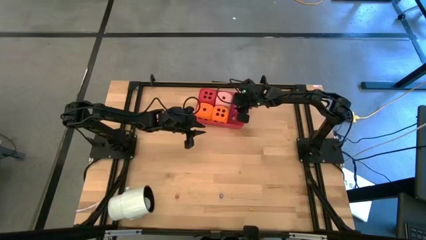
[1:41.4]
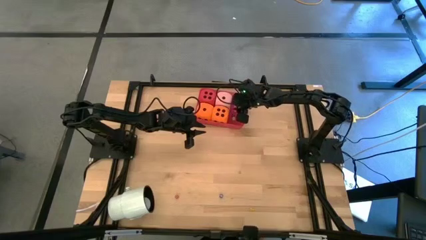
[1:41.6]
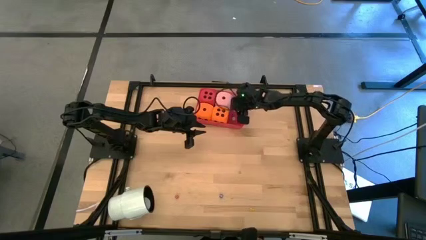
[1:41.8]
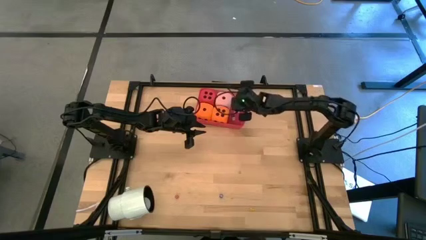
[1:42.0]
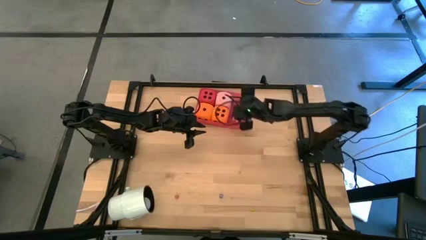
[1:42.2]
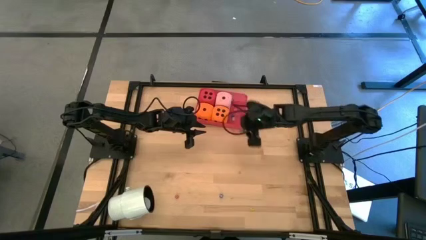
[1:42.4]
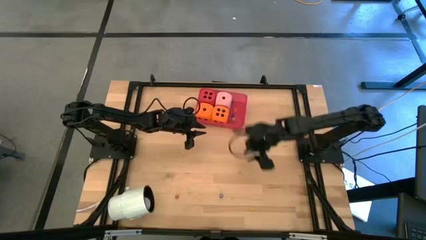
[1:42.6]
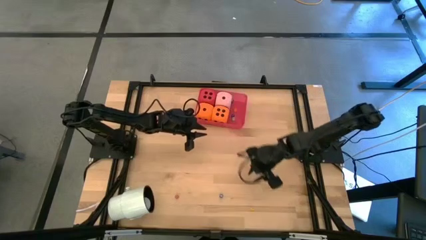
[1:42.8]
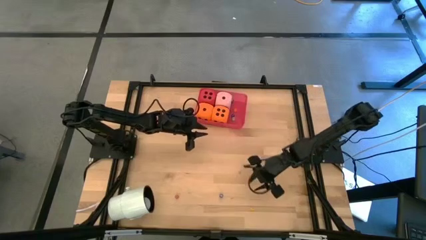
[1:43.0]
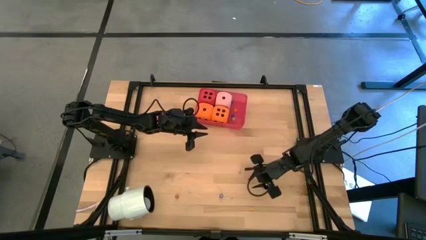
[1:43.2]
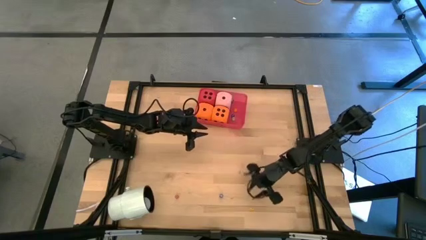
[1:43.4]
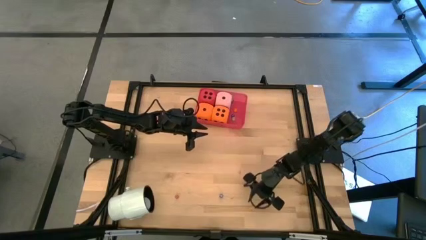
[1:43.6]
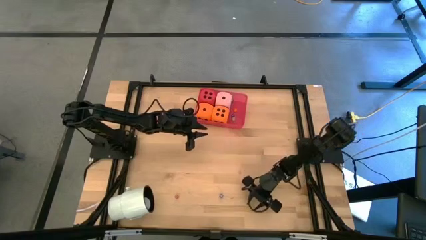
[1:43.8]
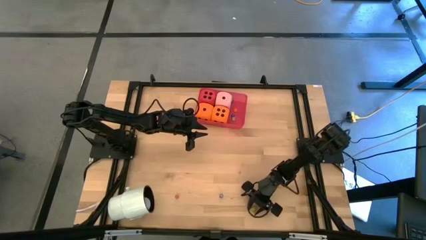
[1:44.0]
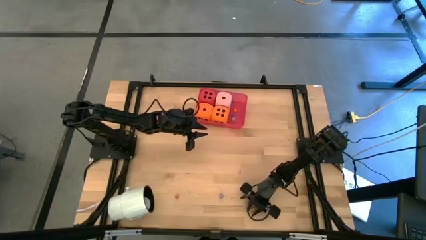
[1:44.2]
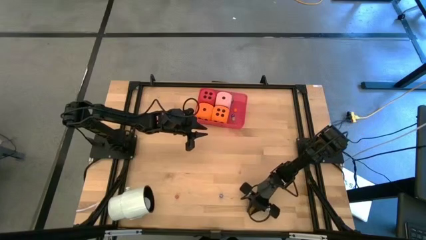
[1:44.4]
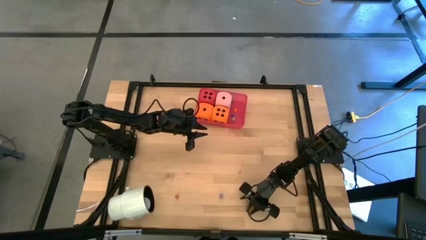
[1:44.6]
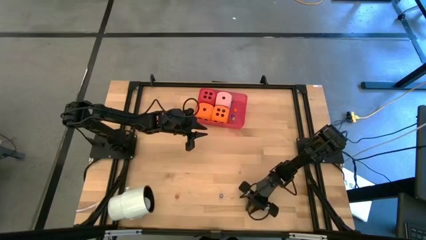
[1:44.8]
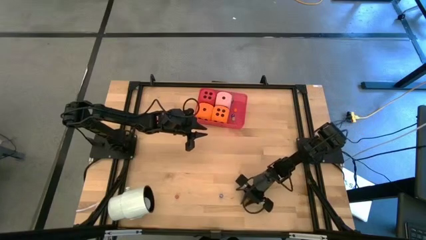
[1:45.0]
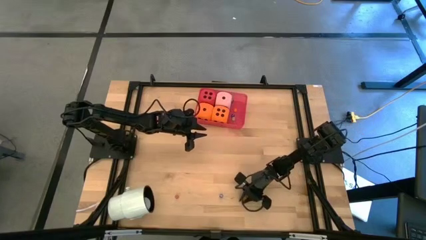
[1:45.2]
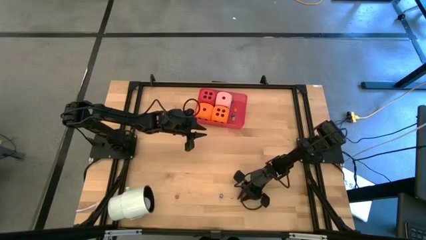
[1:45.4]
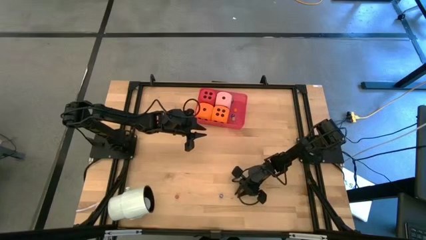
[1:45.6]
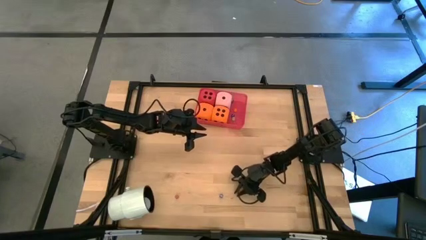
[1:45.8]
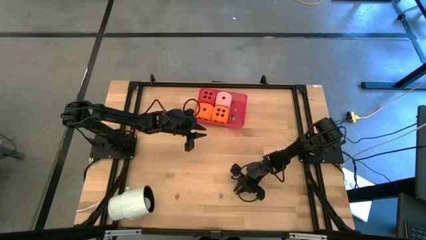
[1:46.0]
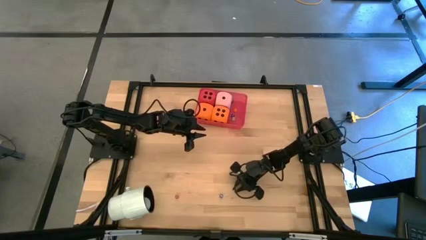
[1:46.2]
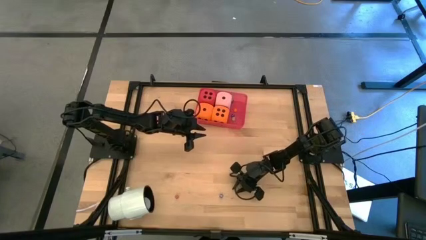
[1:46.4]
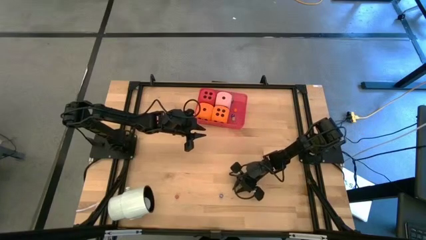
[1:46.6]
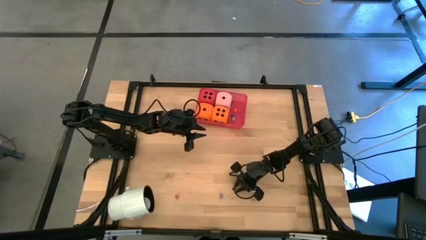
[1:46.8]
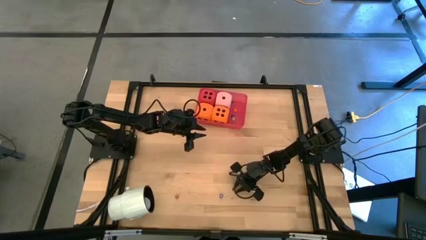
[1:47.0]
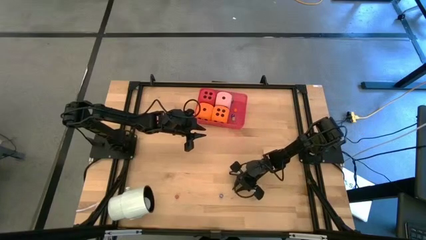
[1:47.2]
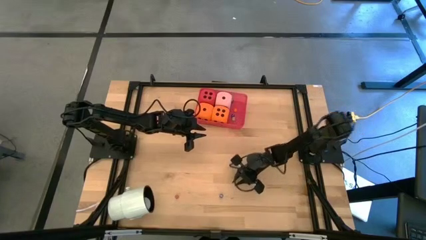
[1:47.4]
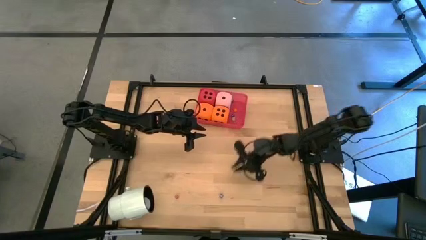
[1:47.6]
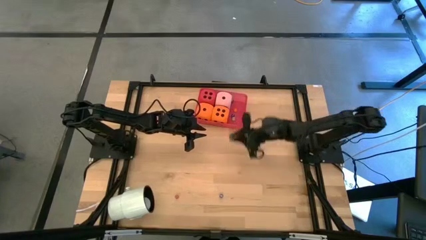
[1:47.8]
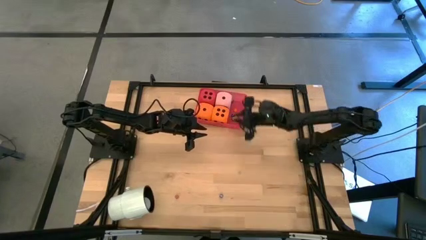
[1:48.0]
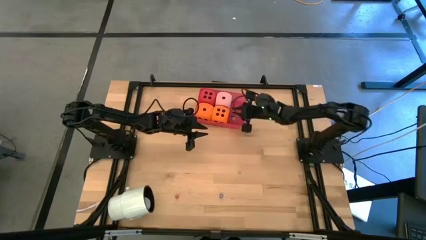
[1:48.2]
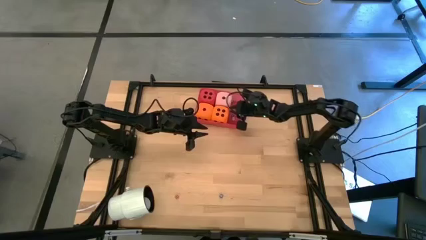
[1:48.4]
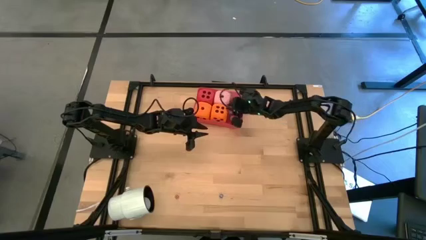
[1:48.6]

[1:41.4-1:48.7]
Task: Pick & Place Dice
Put the small yellow dice into the red container

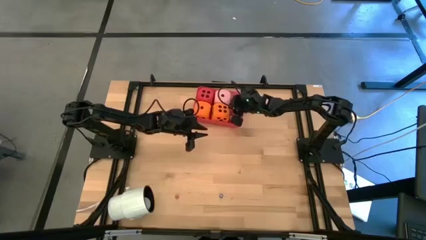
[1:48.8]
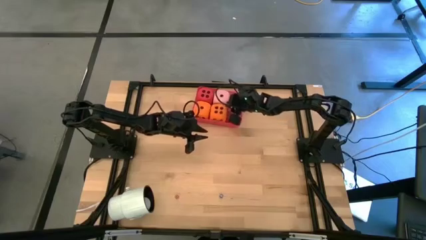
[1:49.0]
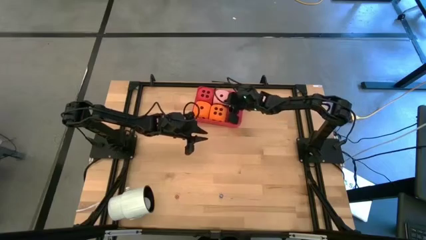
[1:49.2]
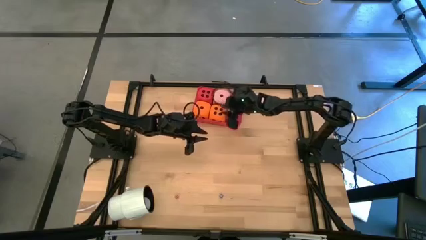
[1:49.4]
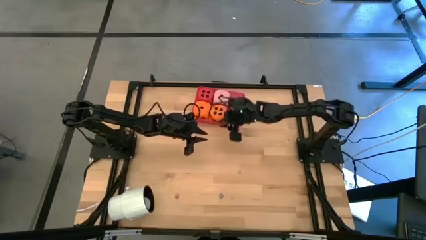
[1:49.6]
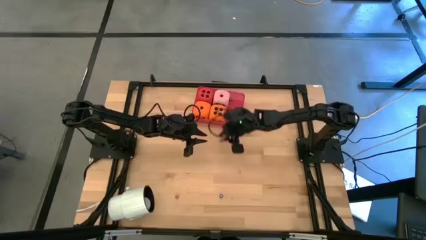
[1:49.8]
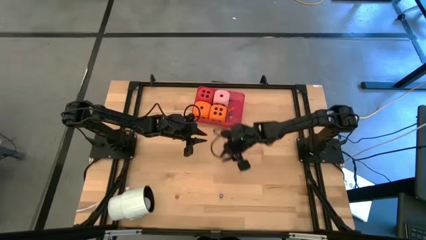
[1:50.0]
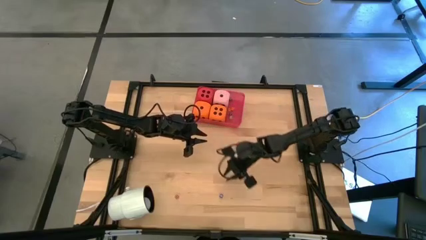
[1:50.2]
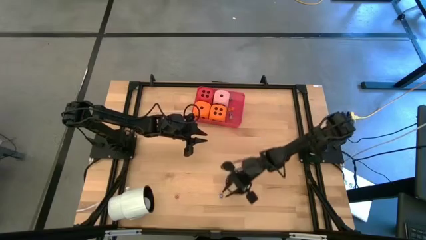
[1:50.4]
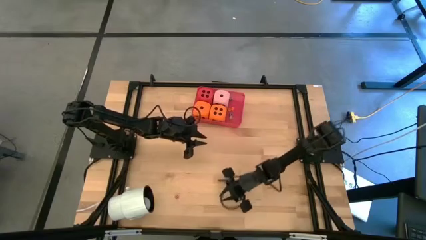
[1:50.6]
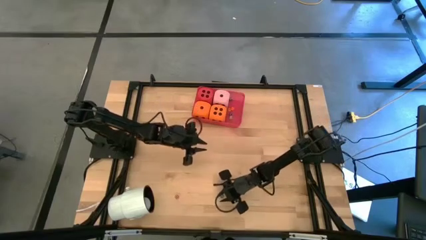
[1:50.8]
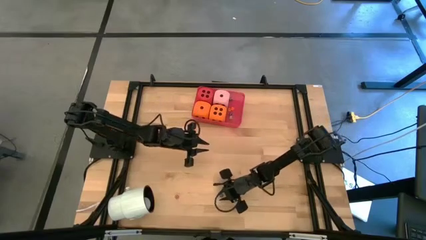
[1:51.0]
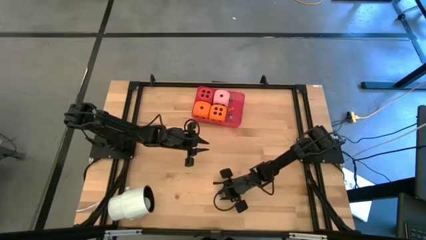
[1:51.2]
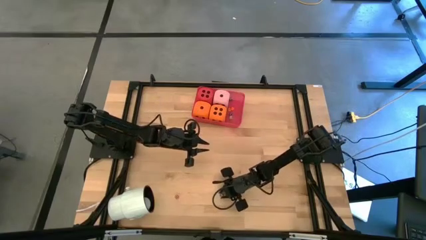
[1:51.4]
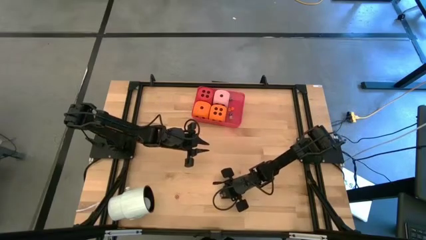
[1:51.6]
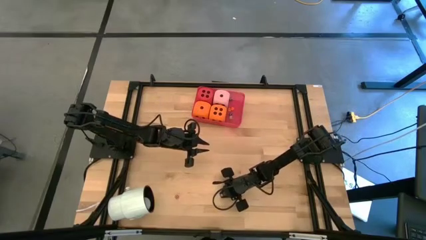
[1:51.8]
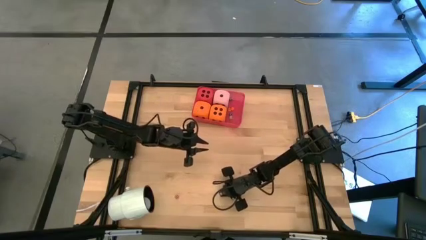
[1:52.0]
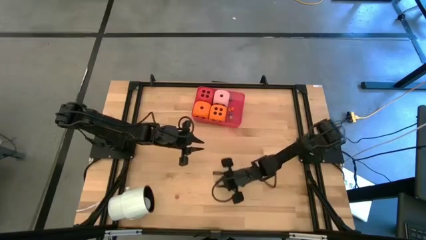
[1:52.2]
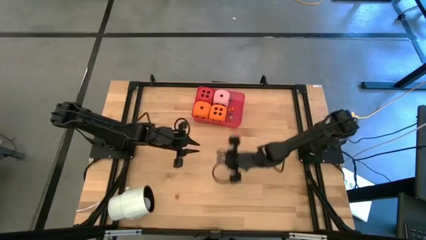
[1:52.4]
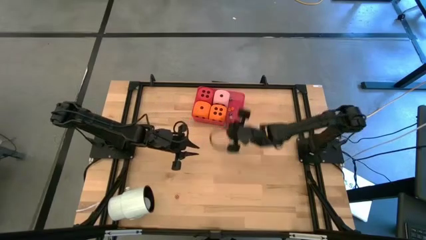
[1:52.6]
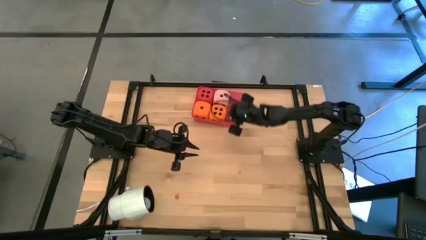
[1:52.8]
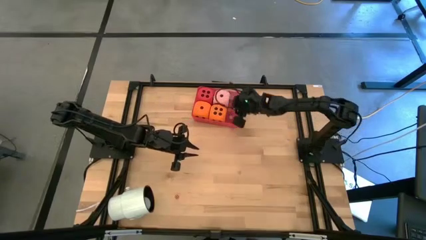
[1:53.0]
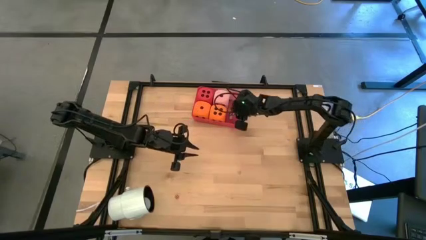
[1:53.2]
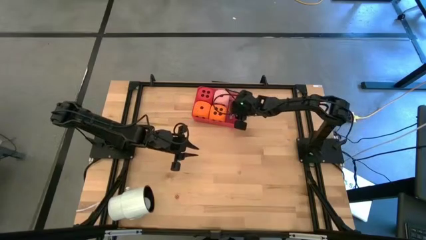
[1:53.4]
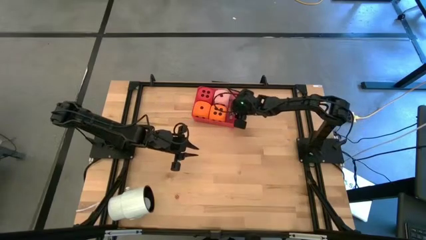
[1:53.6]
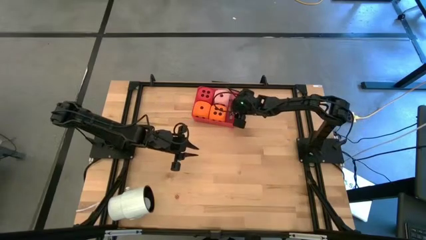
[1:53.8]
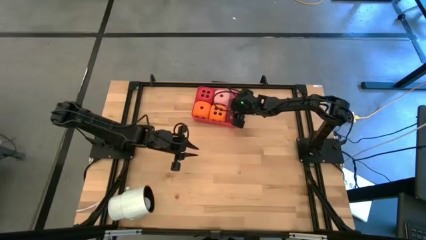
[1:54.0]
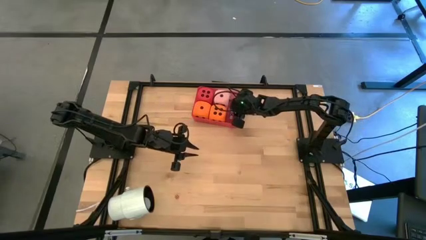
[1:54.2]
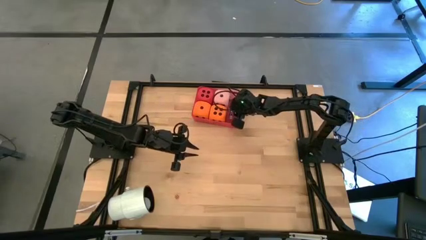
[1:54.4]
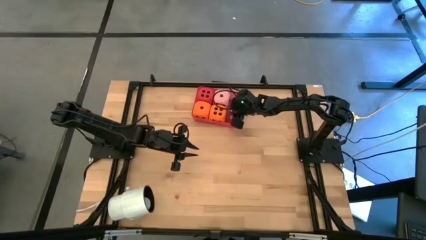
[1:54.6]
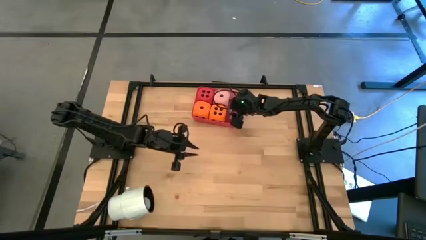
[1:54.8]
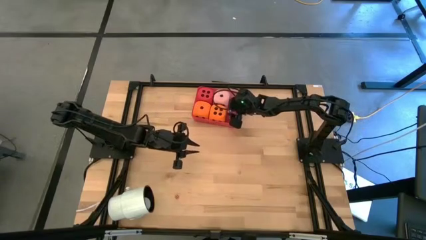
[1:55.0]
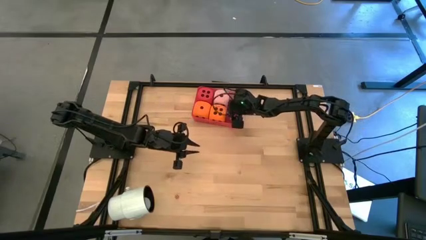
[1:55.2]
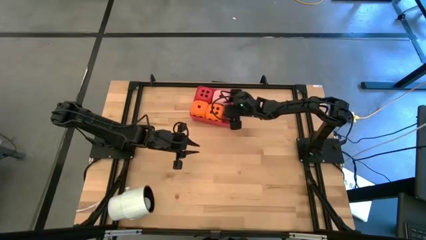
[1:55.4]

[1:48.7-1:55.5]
Put the small blue dice into the red container

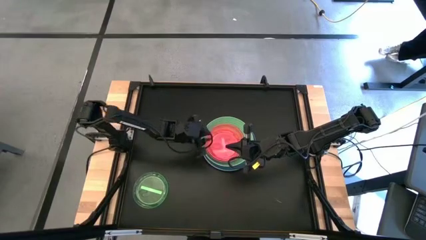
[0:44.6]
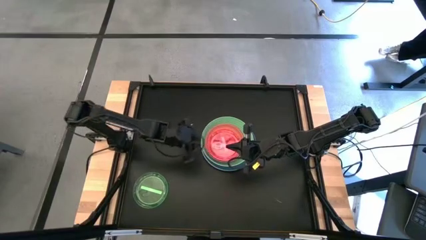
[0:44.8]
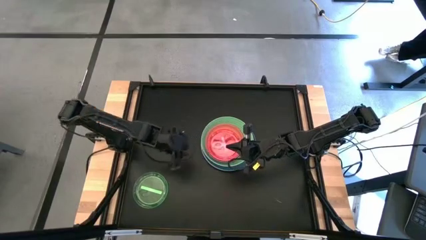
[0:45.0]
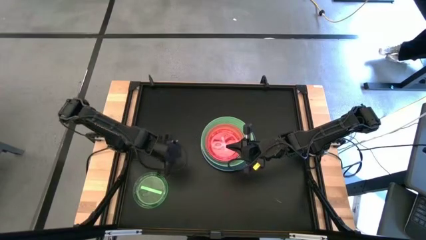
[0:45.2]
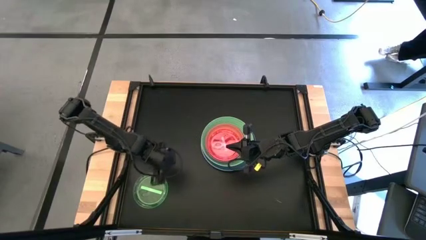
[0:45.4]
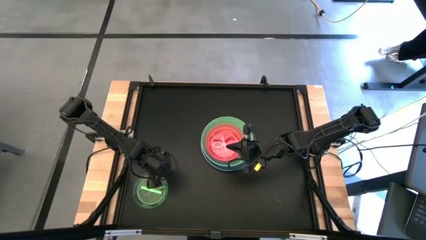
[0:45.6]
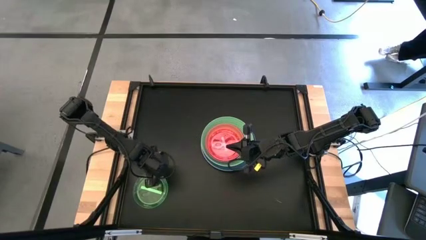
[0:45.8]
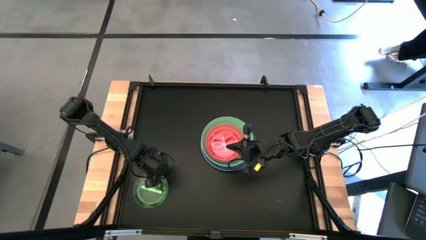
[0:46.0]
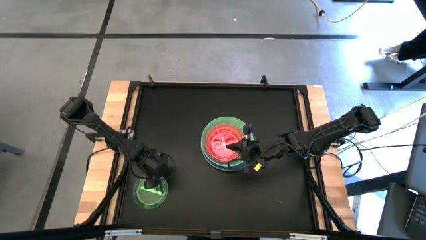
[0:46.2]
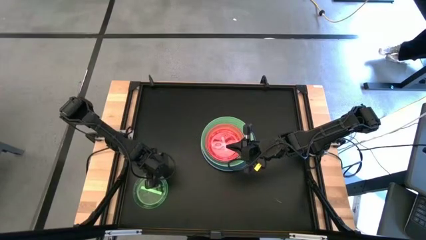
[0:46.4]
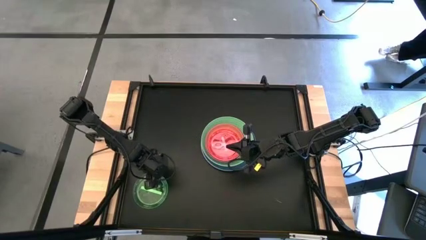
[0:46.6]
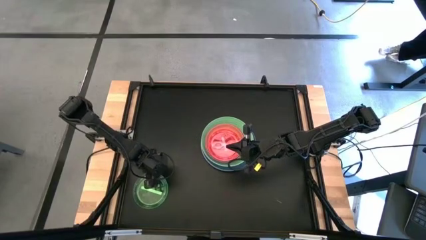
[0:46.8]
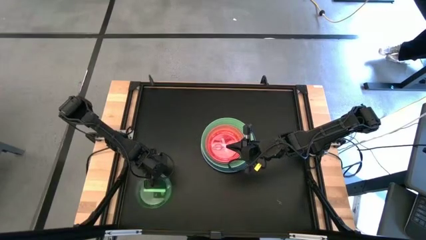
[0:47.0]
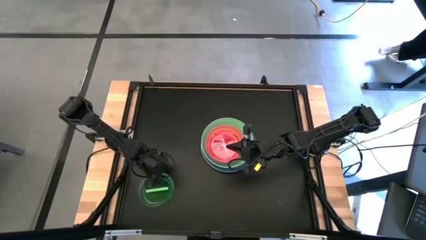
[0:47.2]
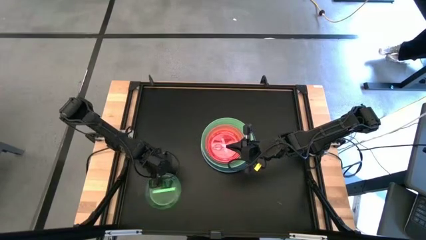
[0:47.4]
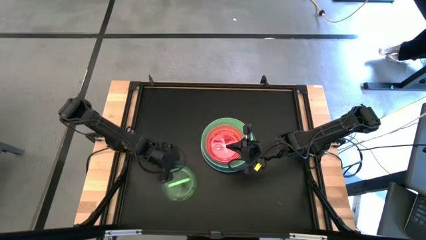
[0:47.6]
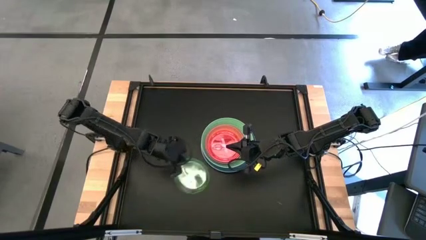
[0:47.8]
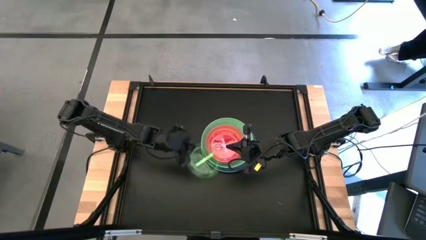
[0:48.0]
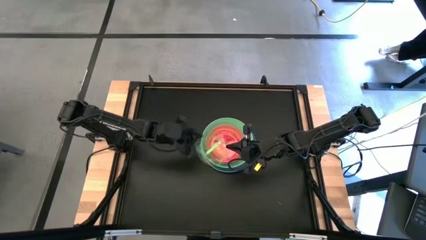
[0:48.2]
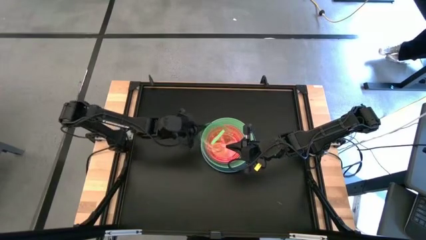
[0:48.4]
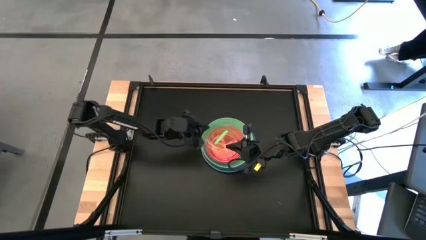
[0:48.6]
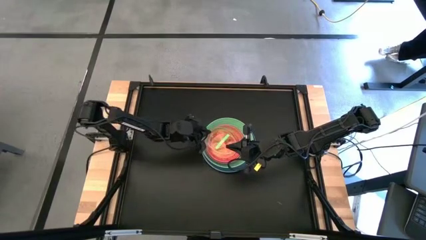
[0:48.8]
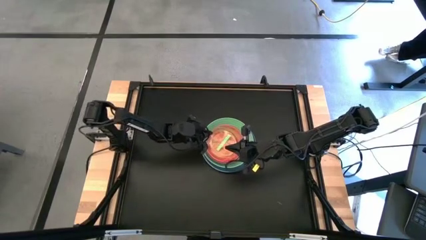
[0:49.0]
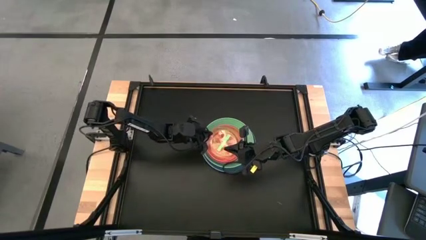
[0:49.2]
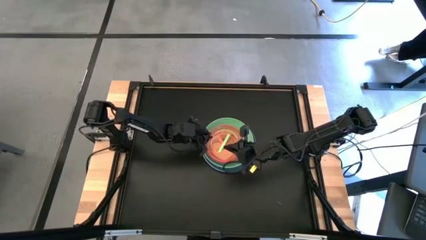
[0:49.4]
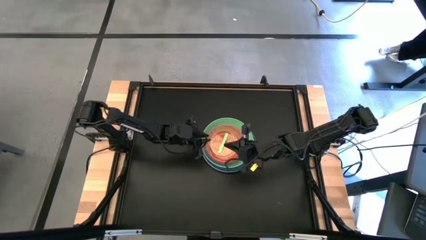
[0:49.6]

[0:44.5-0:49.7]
Task: Stack plastic plates
Stack the light green plate on top of the pink plate
